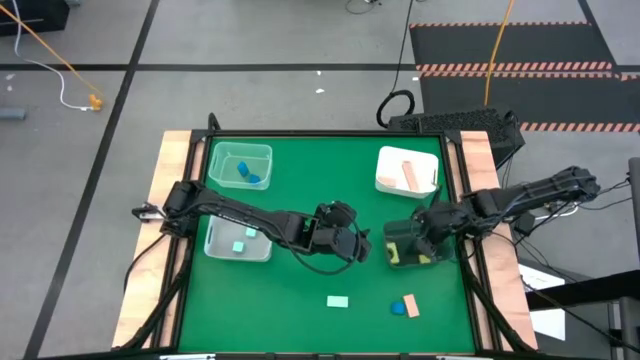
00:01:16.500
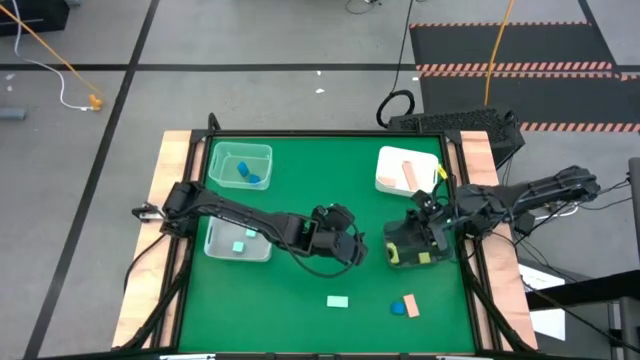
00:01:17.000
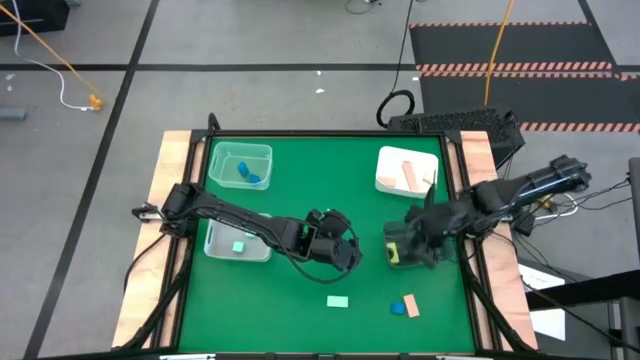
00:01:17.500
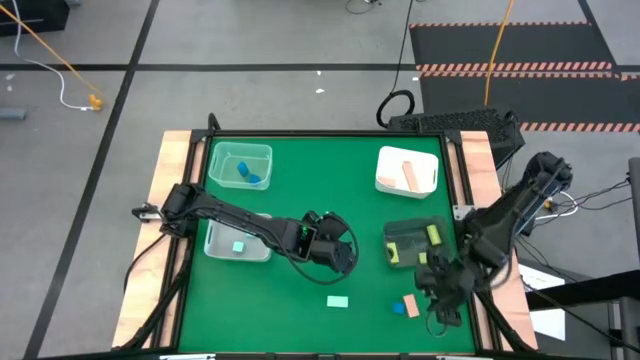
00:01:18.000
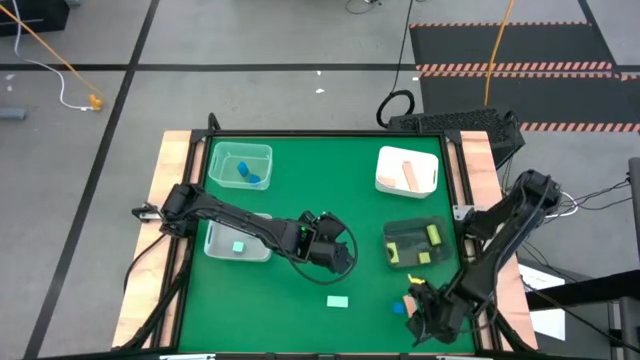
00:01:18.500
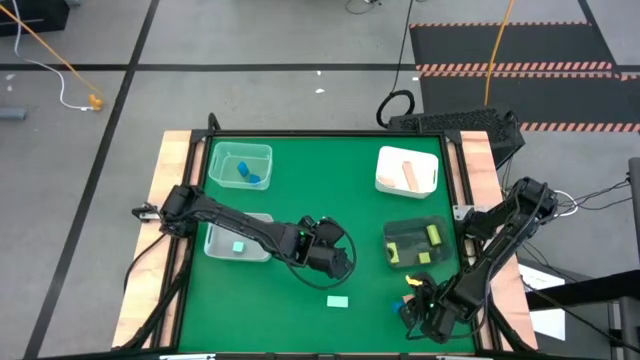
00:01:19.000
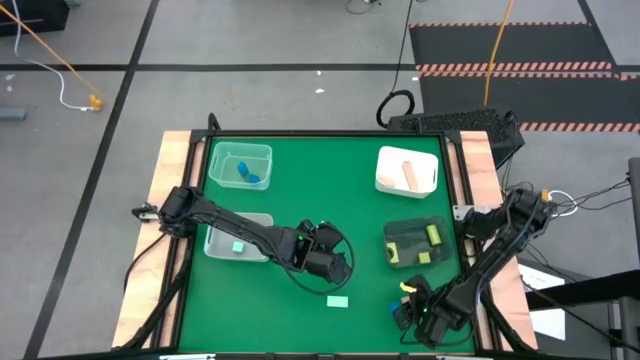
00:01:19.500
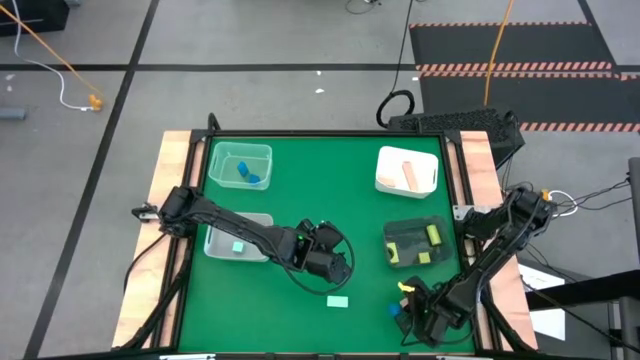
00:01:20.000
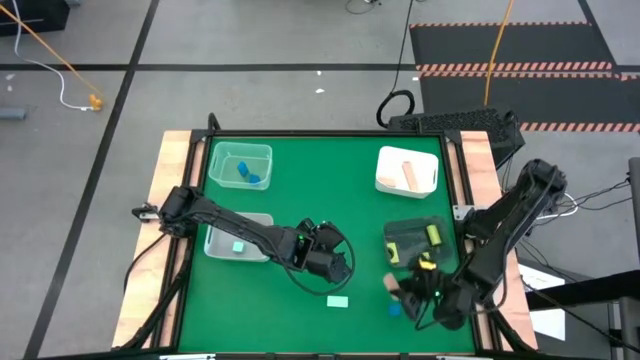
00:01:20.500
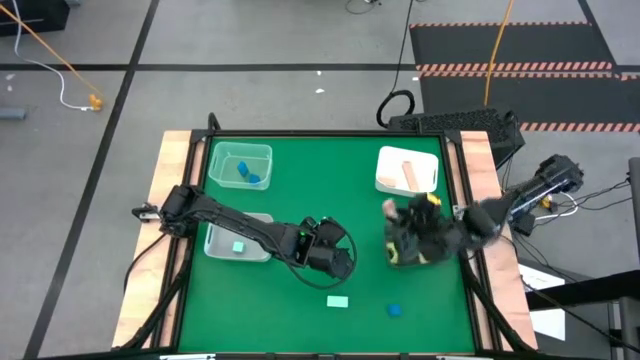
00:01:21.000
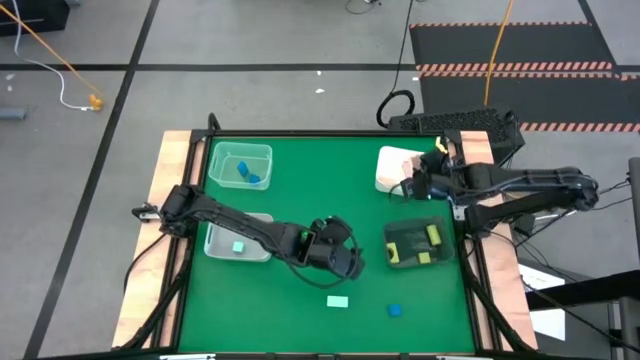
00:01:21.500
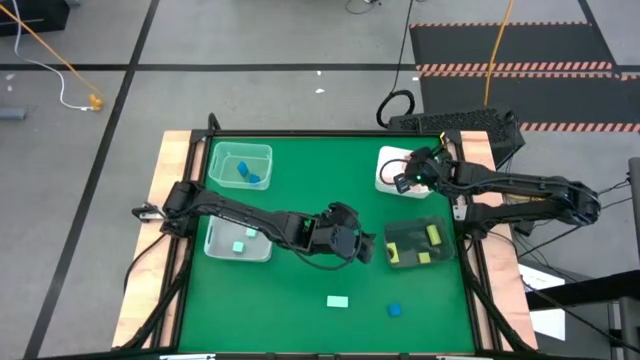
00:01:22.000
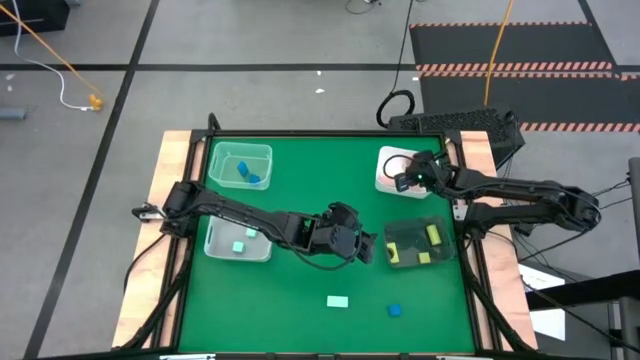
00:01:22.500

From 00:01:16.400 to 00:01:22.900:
Task: Sort & place blocks by color
Put the brown block into the white bin

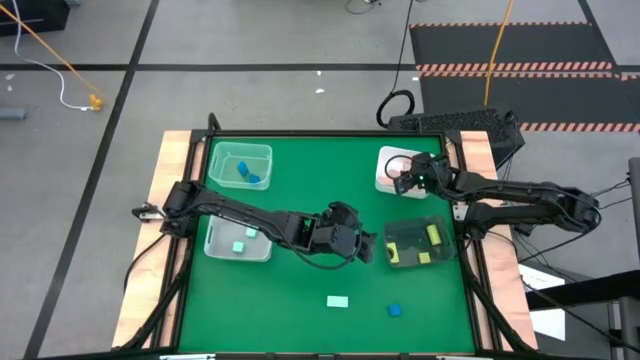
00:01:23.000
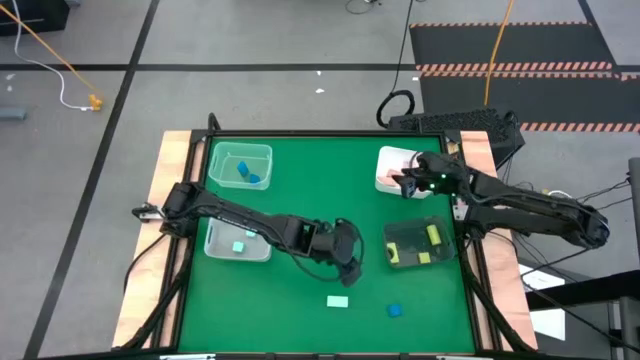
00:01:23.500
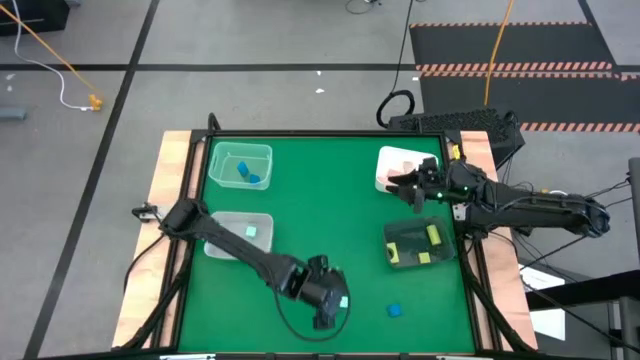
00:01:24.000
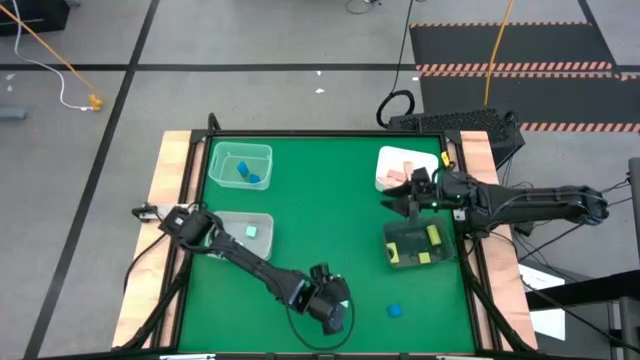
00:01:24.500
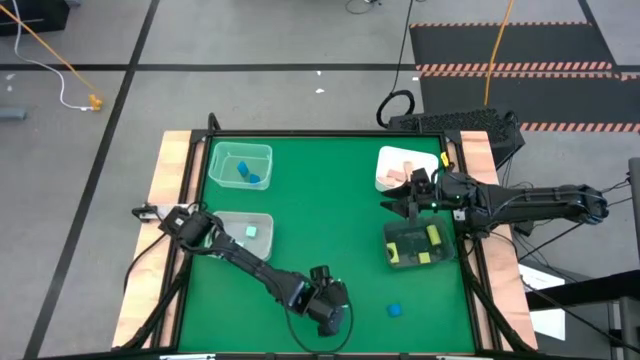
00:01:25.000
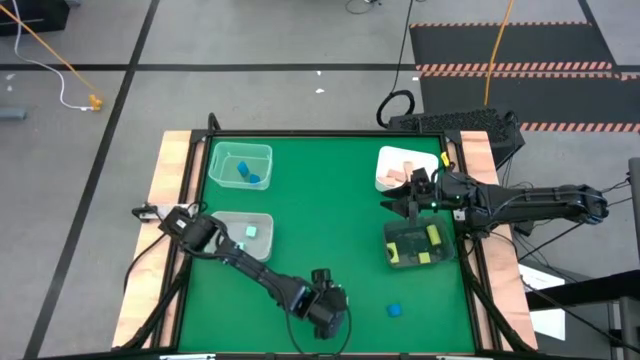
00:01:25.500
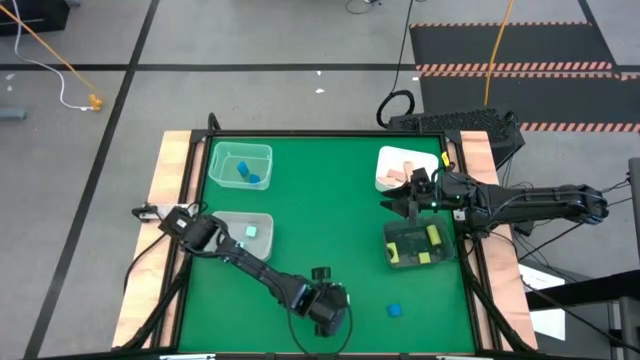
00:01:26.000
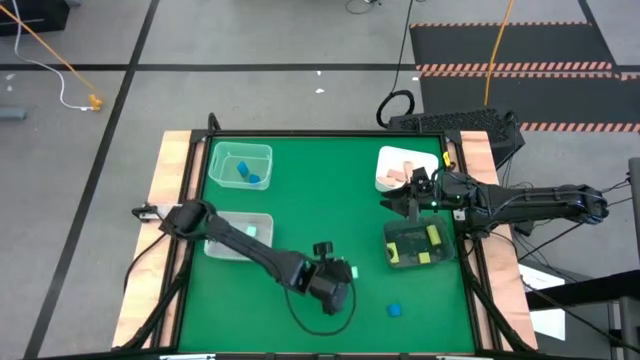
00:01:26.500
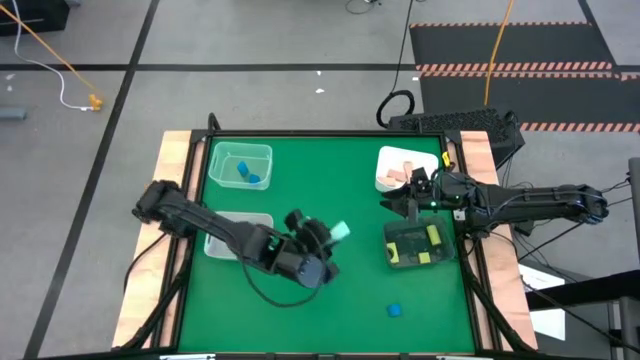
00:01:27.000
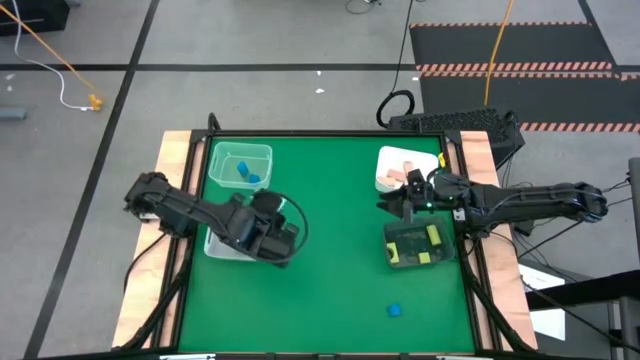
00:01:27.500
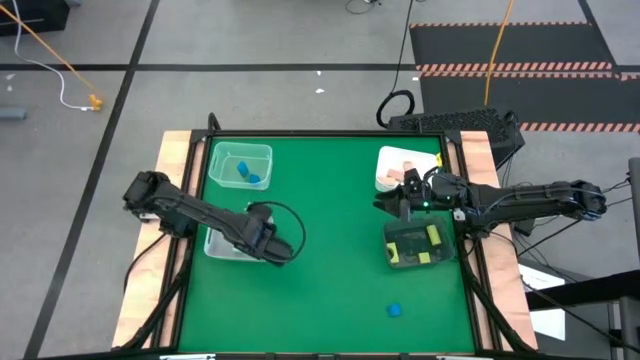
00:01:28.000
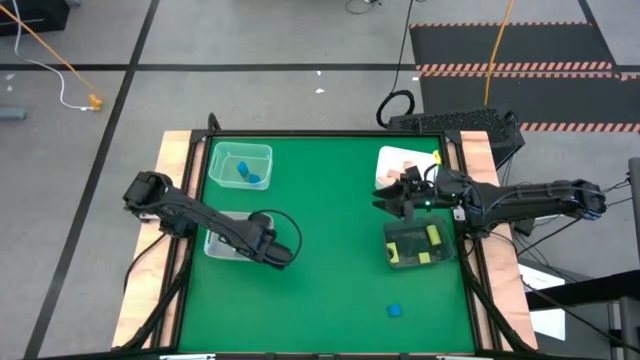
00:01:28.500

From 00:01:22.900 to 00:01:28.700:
Put the light blue block into the gray bin

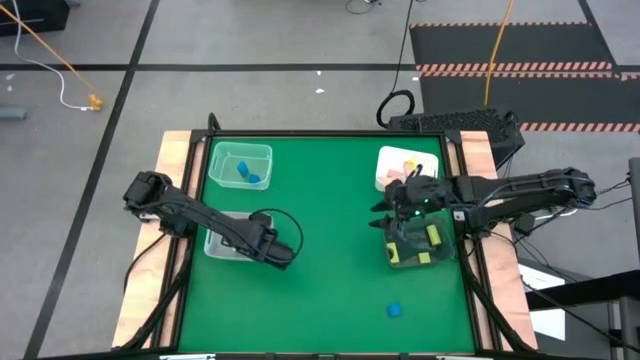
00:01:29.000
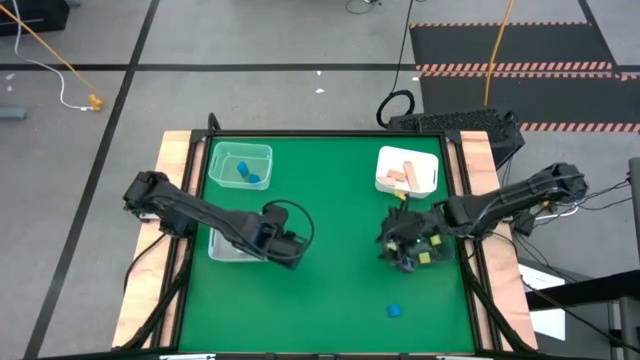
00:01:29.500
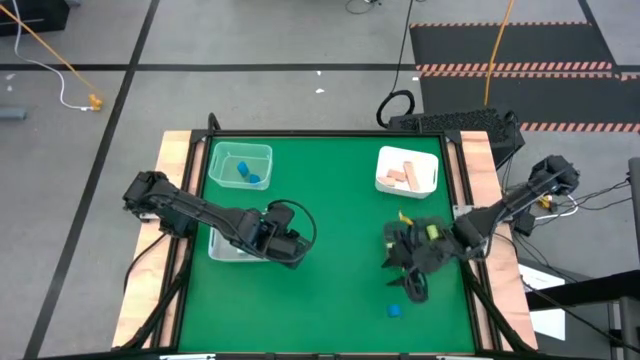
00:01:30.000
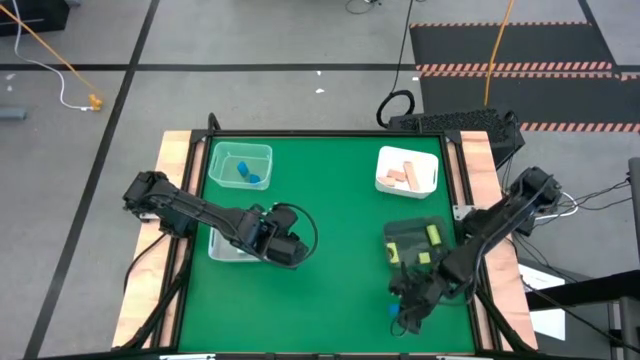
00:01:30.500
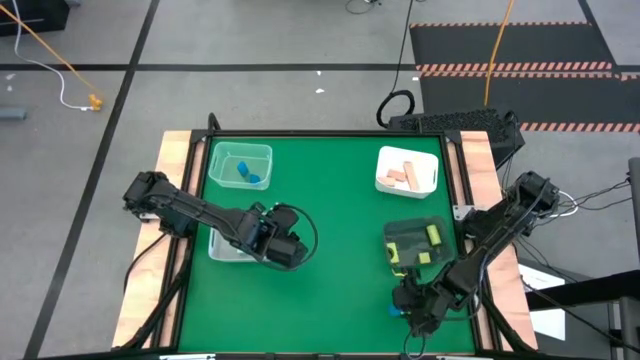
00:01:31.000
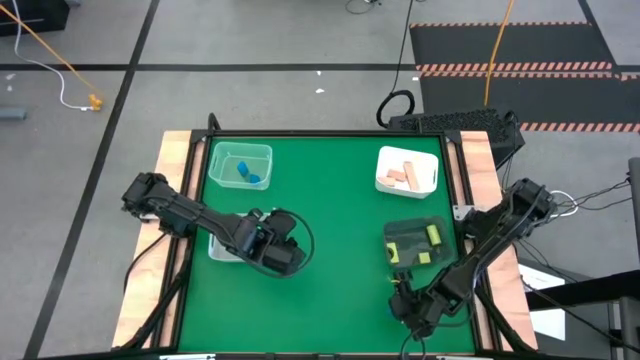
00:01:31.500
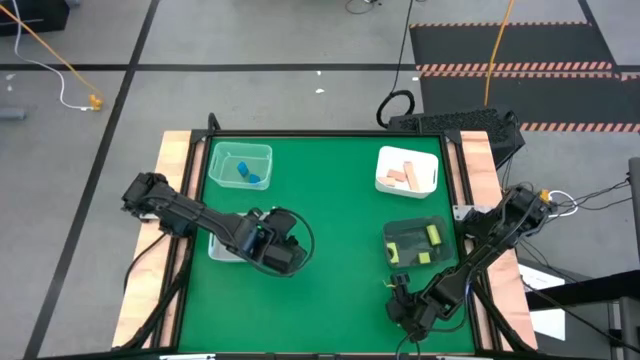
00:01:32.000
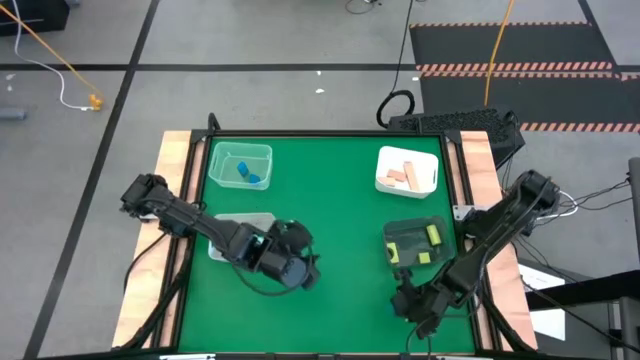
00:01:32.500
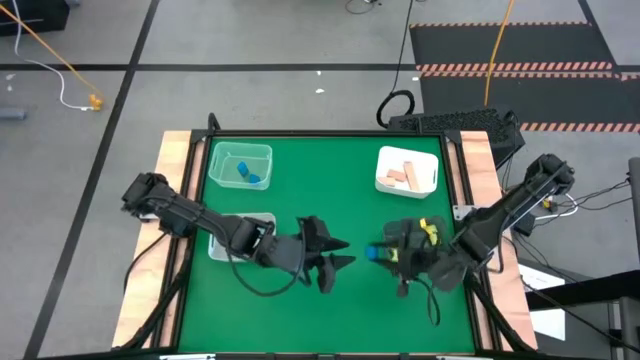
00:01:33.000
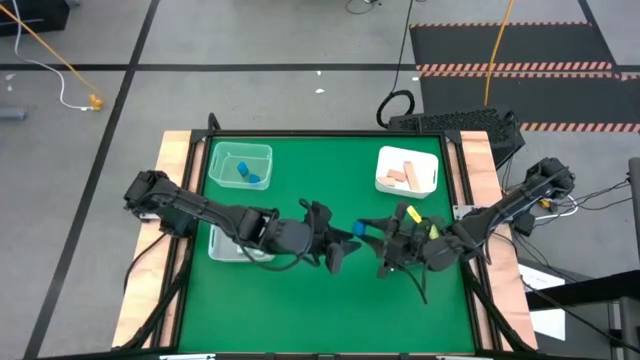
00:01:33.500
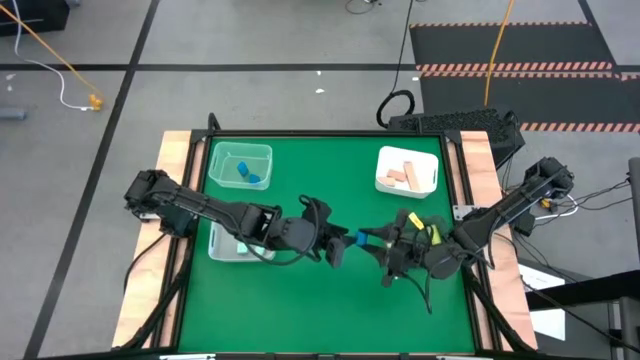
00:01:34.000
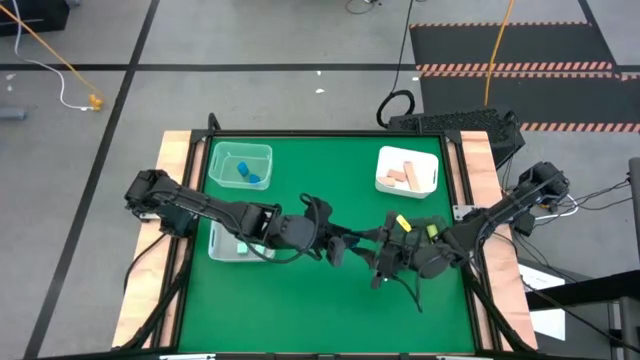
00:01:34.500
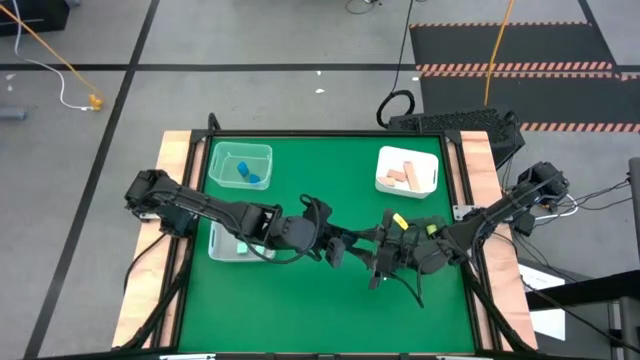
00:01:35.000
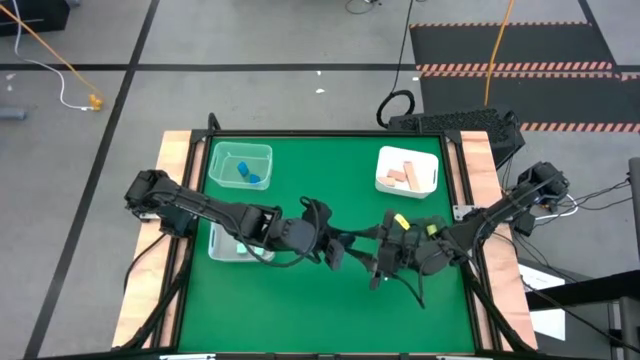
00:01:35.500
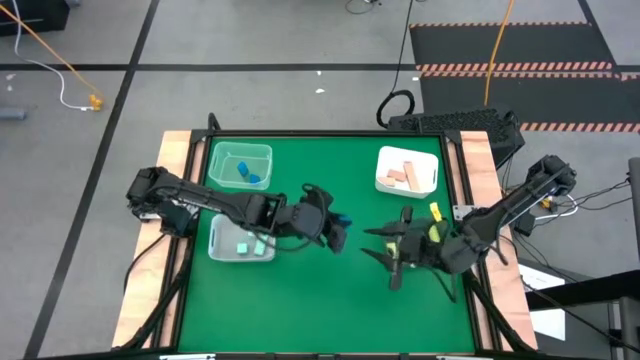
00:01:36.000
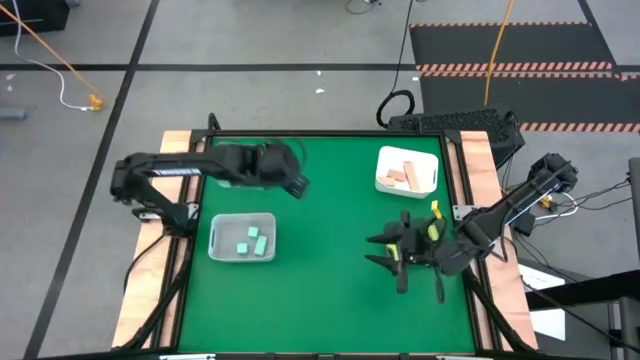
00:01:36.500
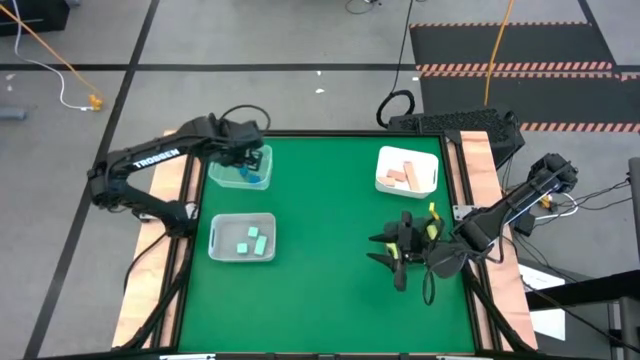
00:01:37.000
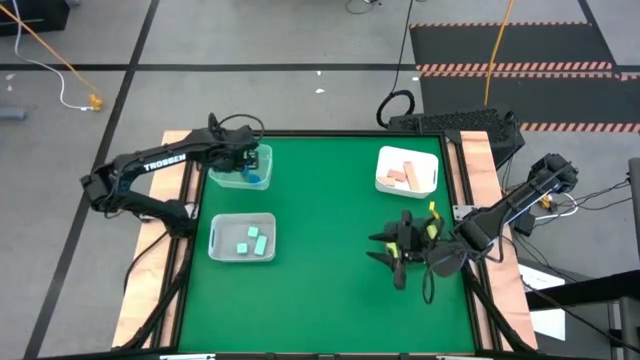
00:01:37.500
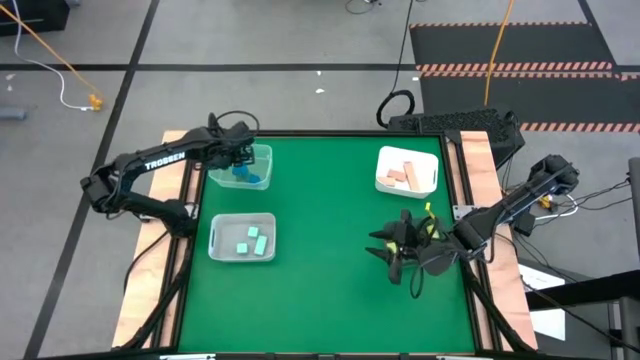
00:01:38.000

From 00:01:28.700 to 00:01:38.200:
Put the blue block into the white transparent bin
